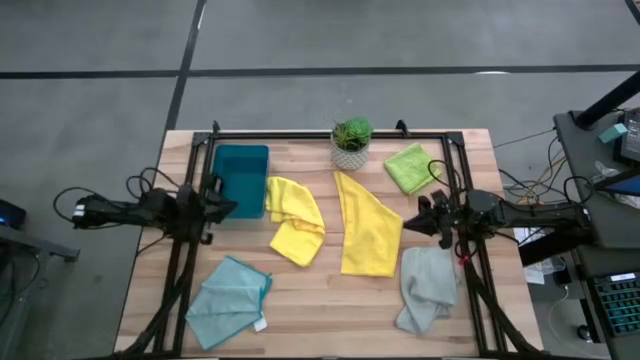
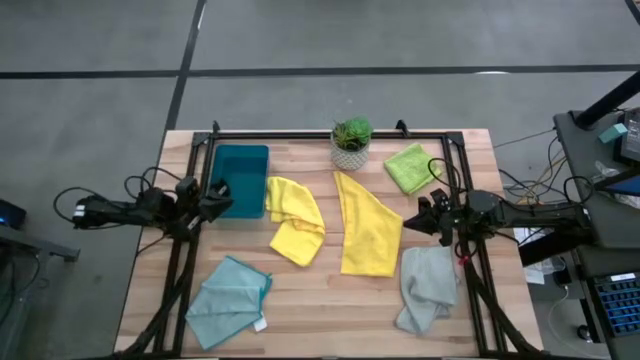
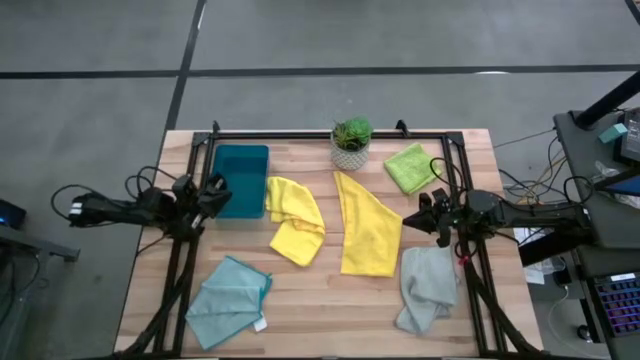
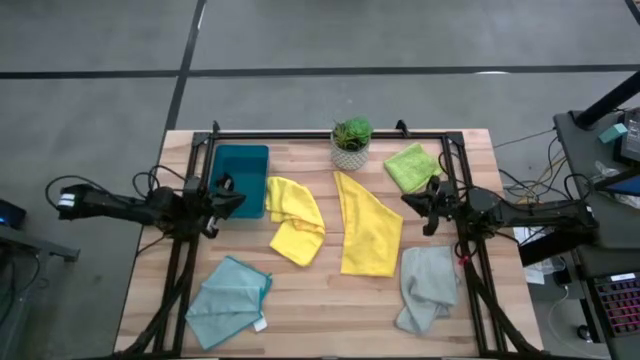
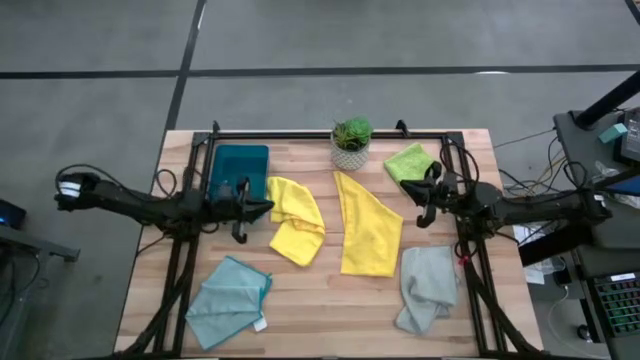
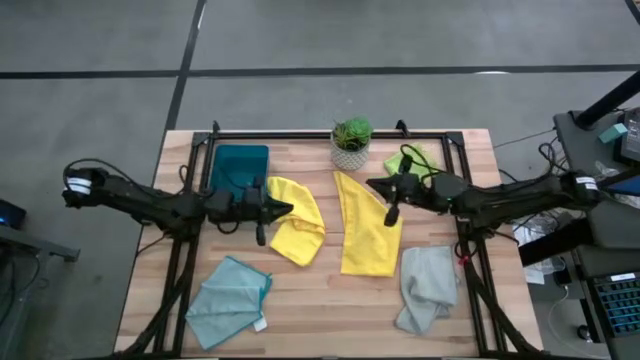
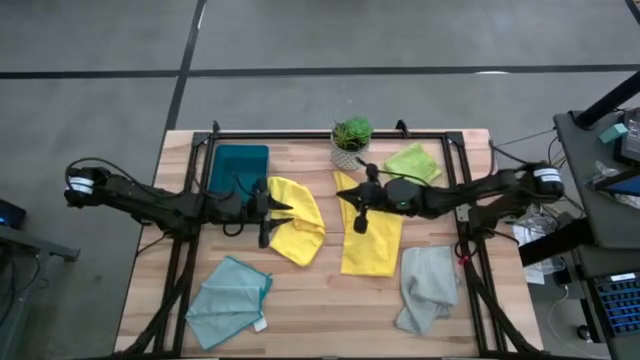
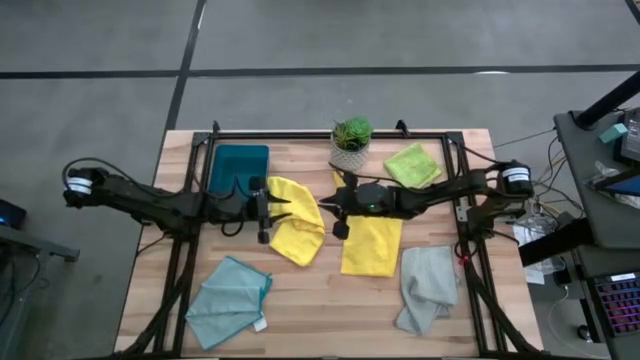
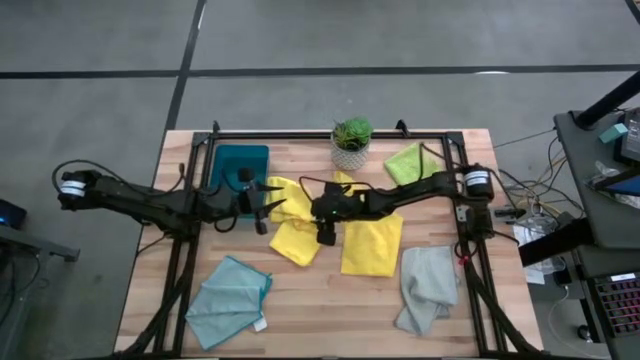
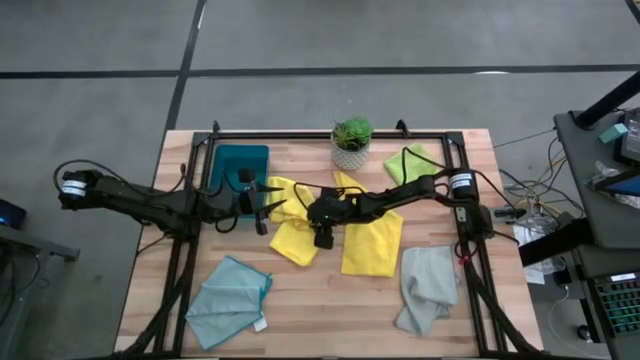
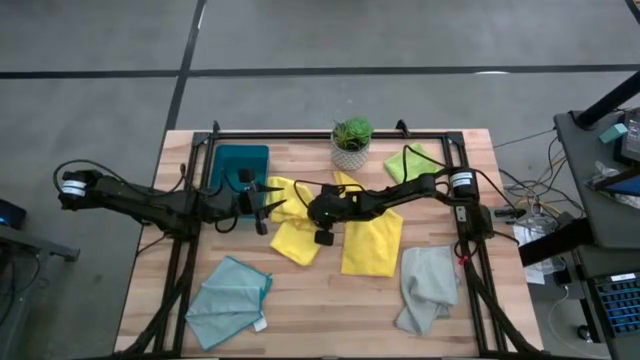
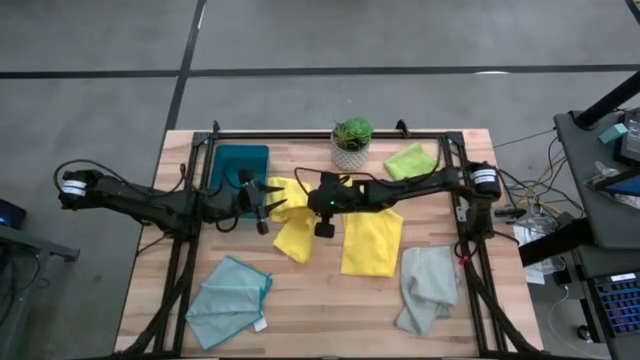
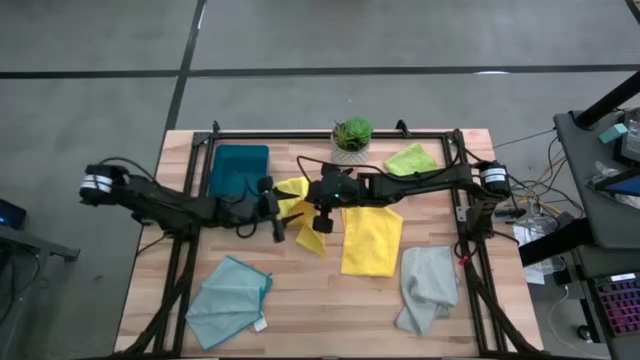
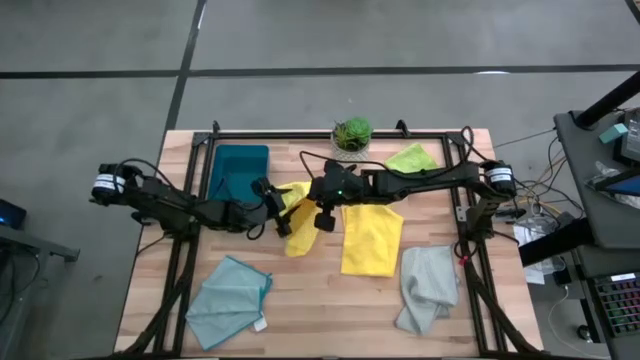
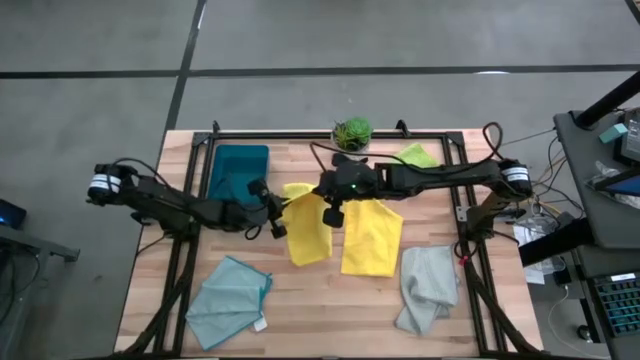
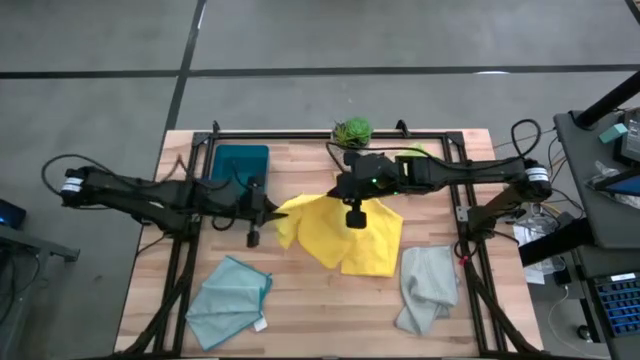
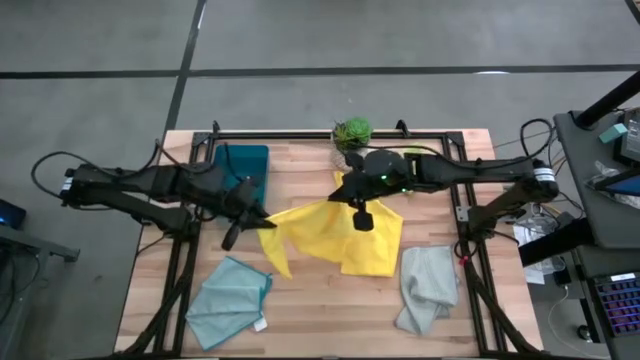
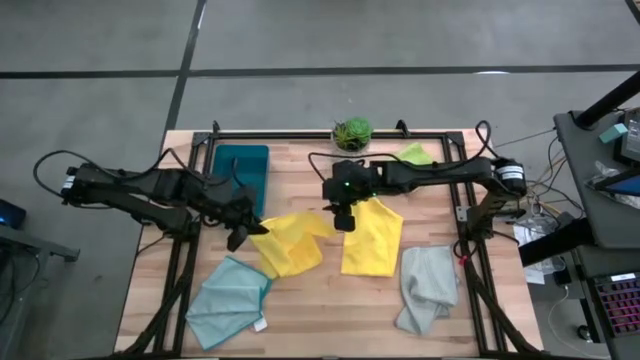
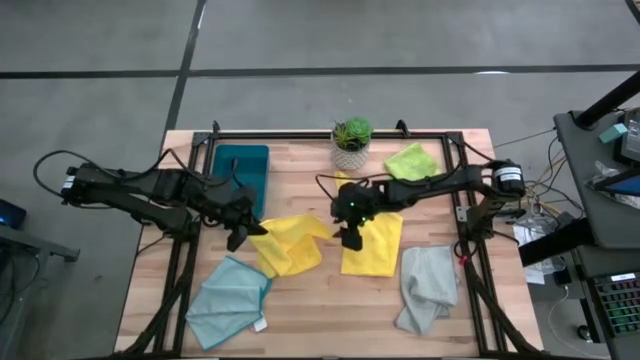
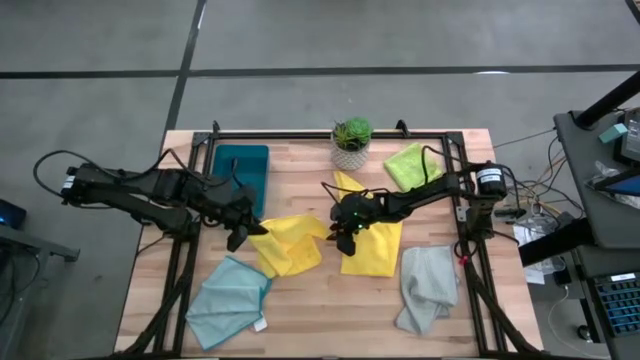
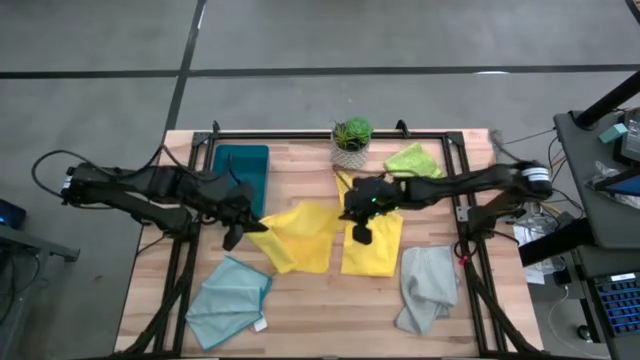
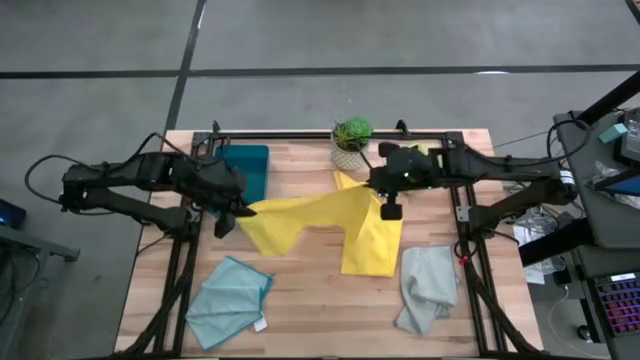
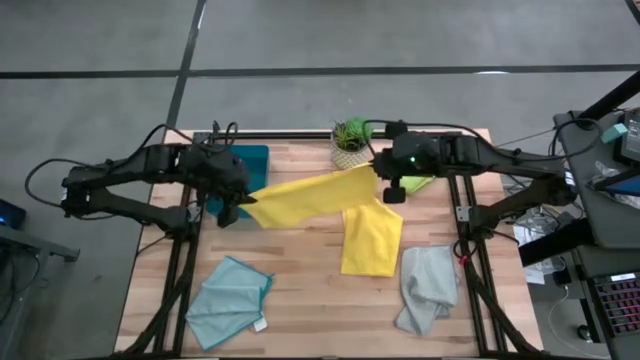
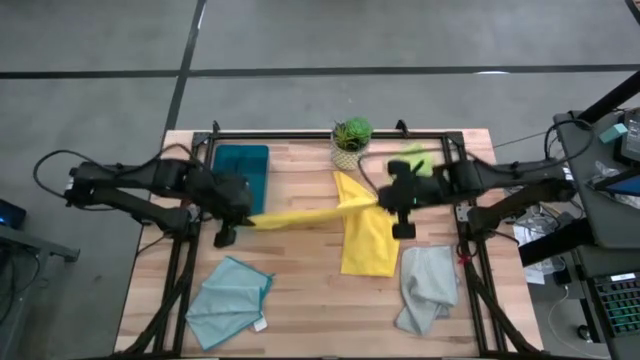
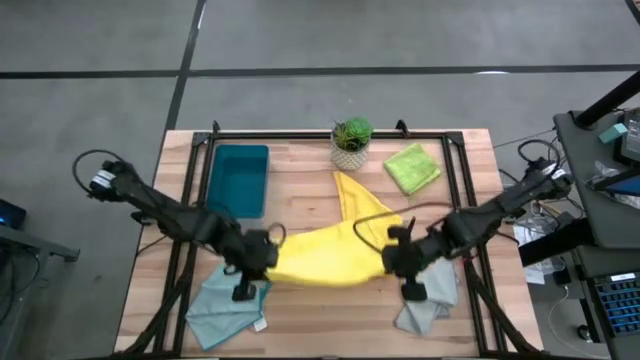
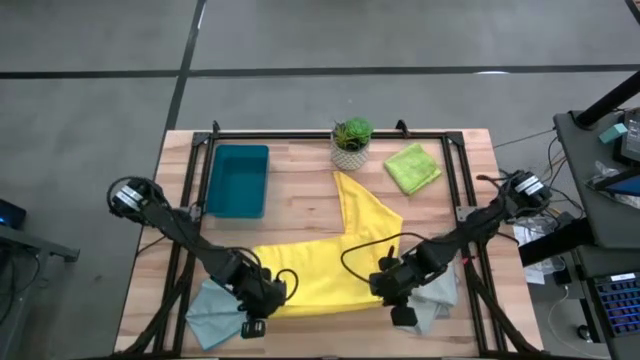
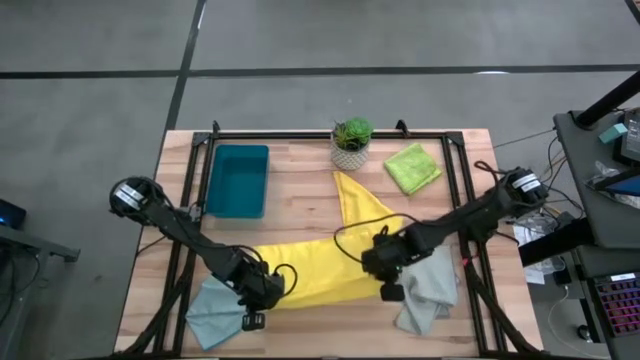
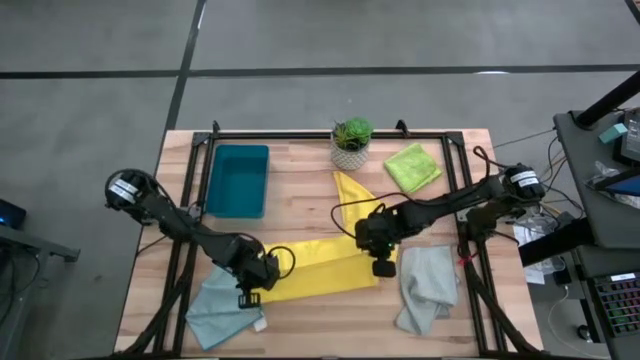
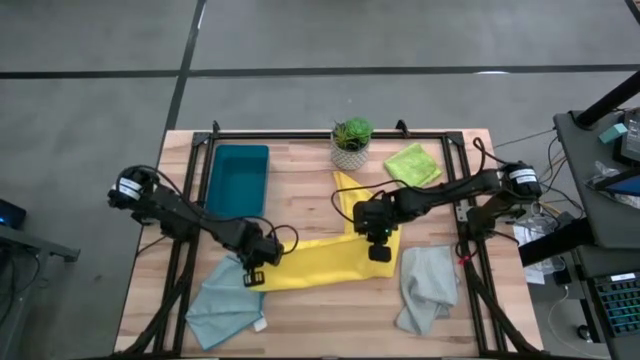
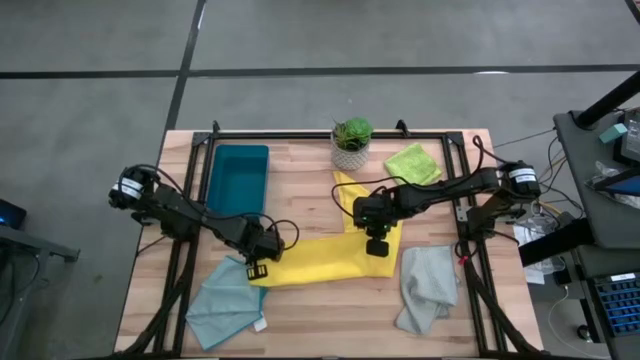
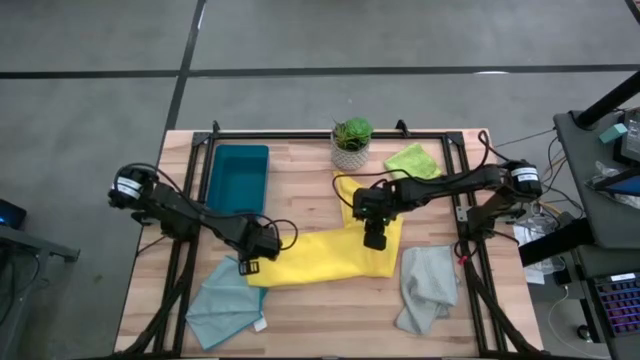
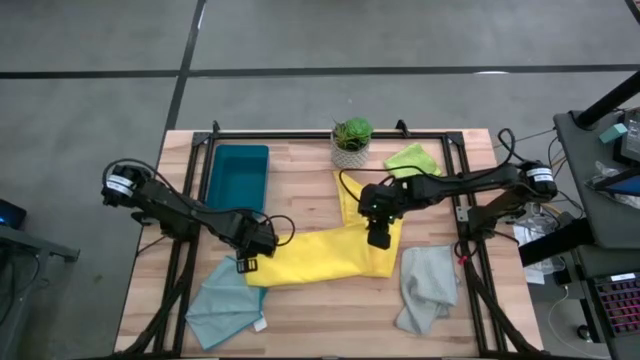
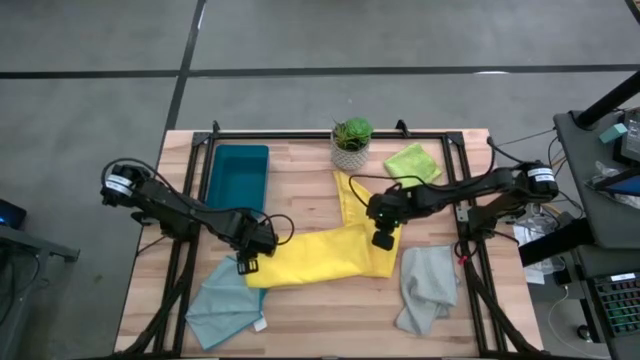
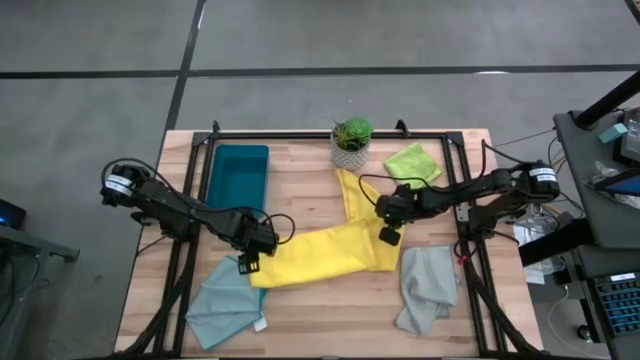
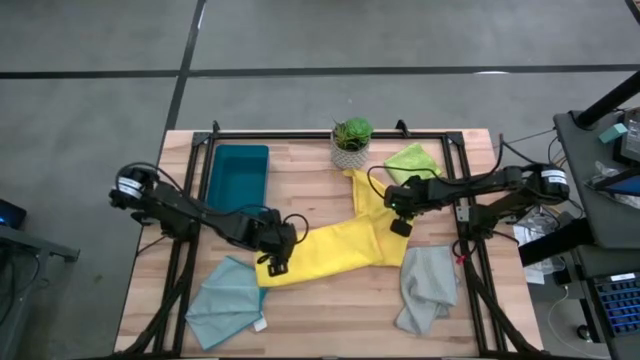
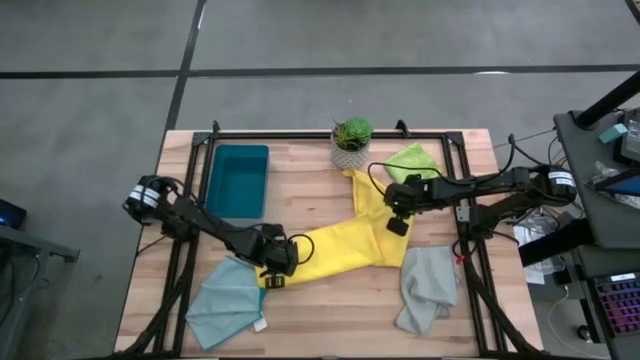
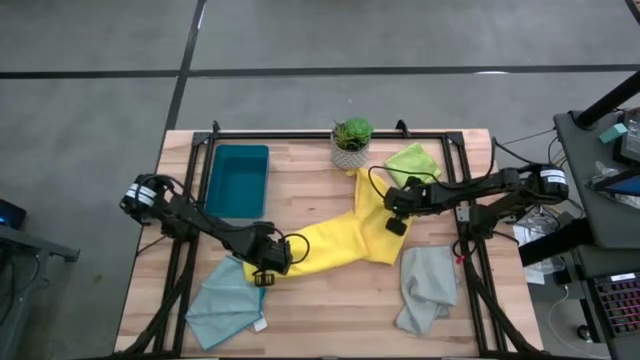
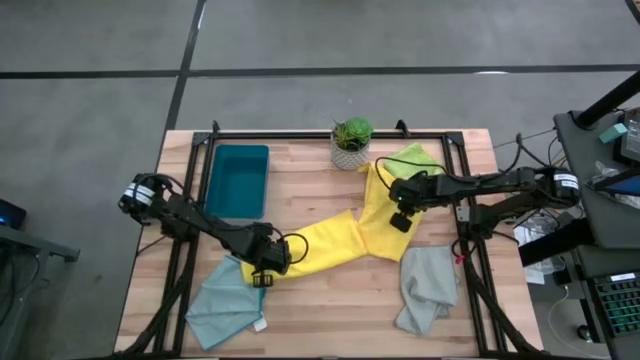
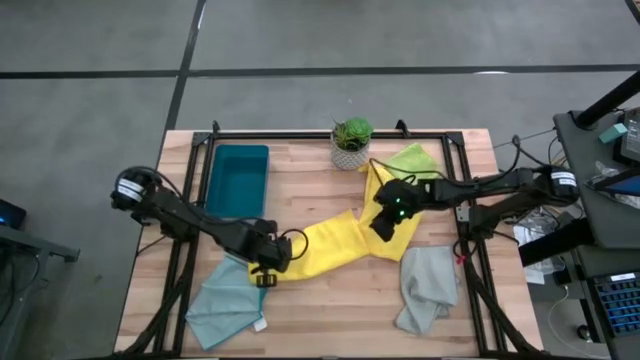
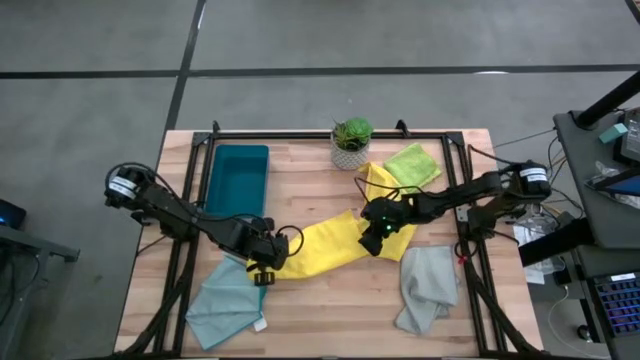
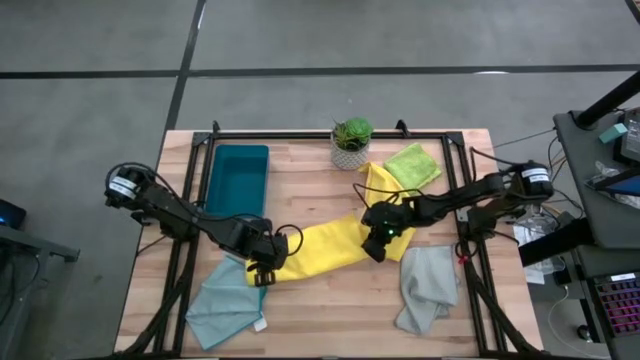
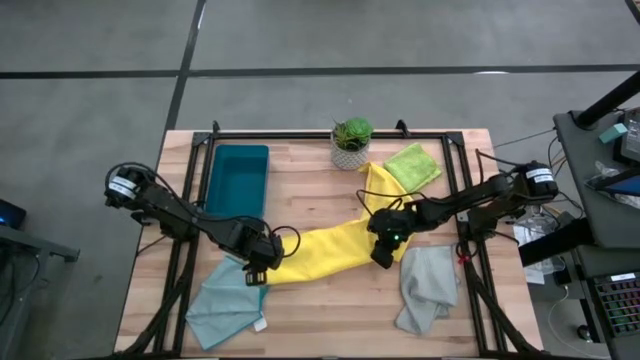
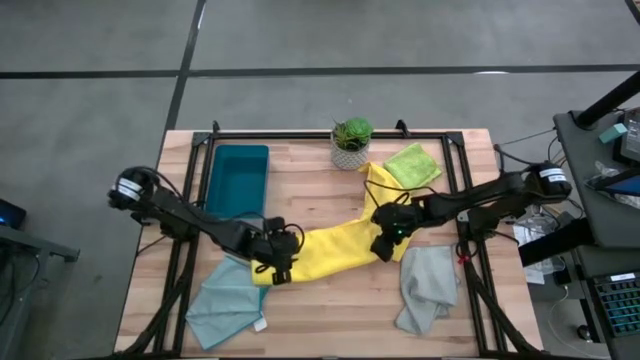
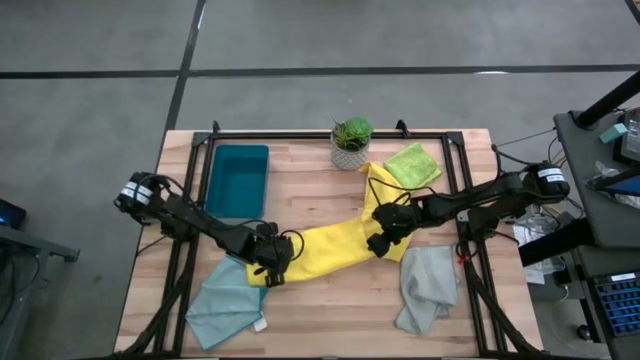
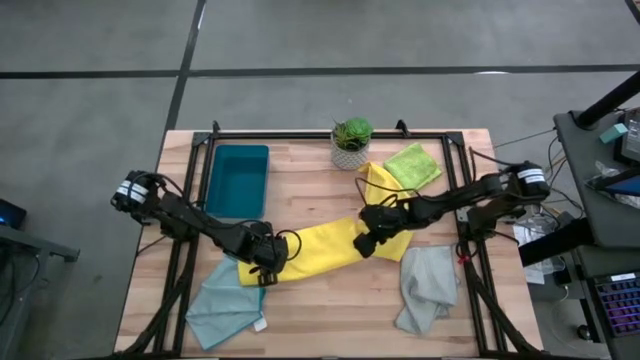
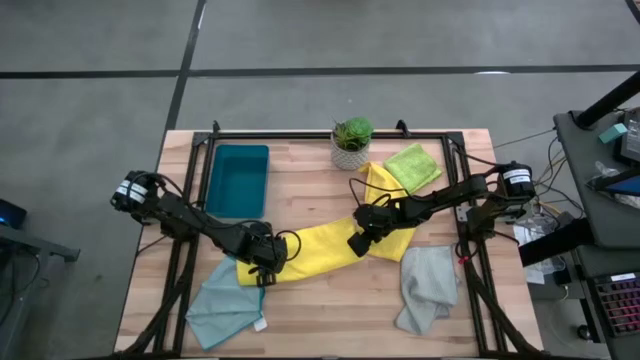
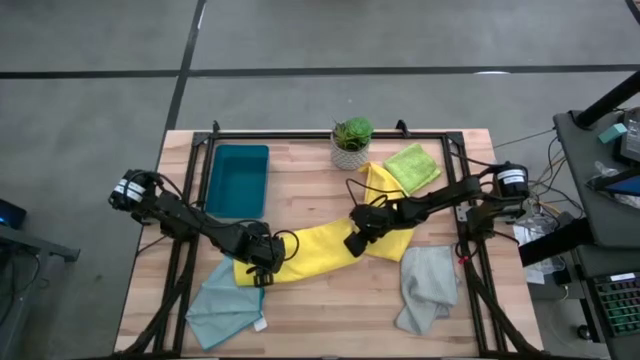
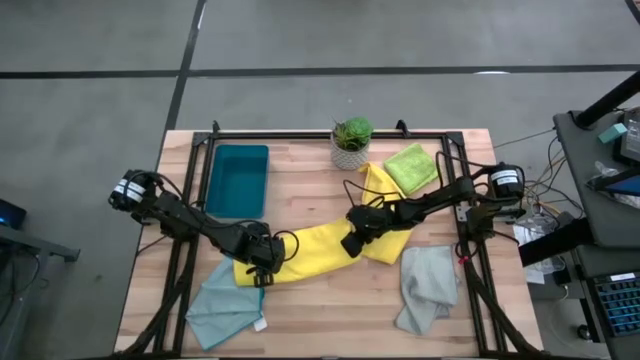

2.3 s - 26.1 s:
Task: Fold microfiber towels
Fold the left yellow towel
